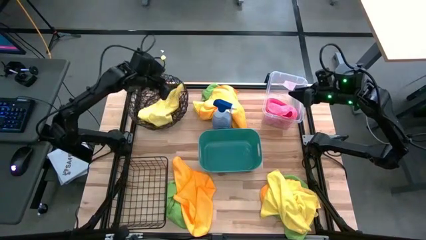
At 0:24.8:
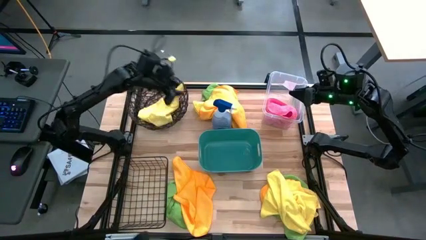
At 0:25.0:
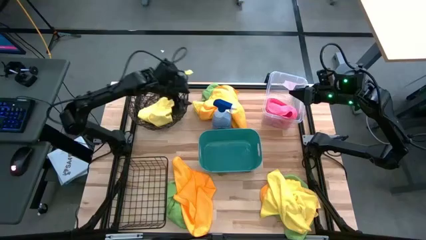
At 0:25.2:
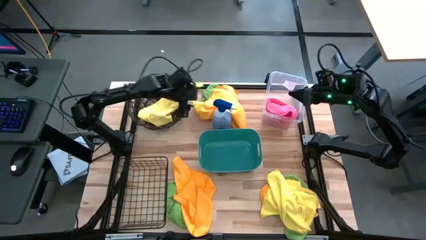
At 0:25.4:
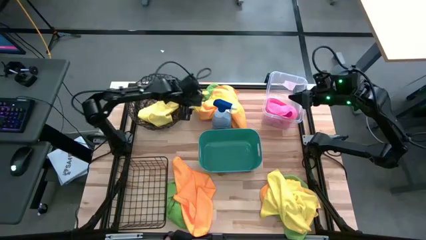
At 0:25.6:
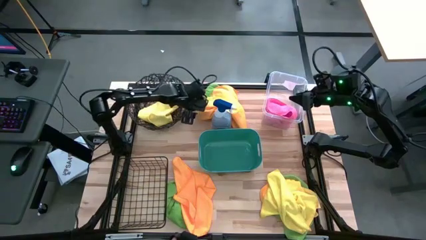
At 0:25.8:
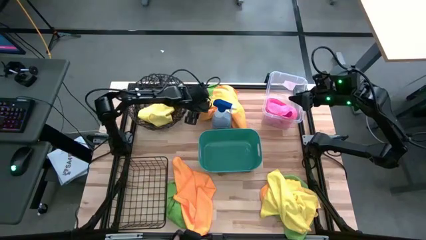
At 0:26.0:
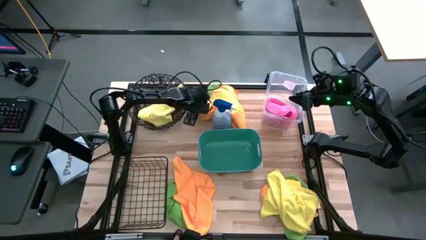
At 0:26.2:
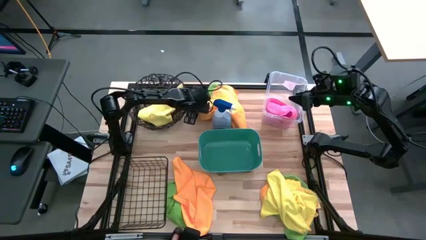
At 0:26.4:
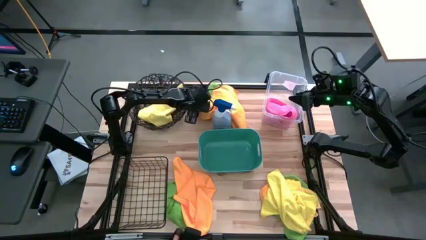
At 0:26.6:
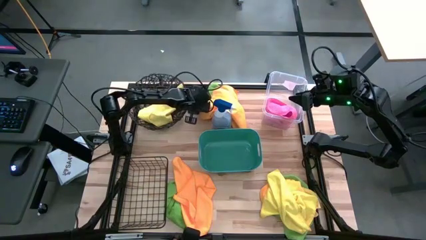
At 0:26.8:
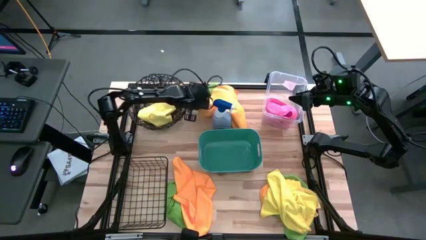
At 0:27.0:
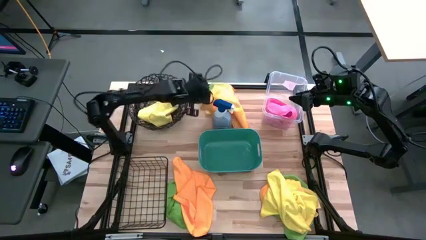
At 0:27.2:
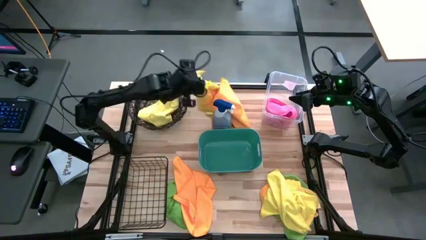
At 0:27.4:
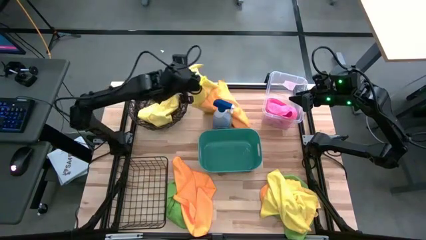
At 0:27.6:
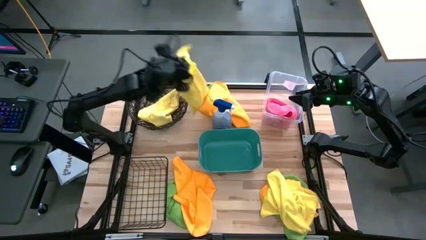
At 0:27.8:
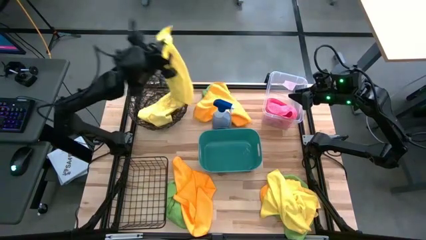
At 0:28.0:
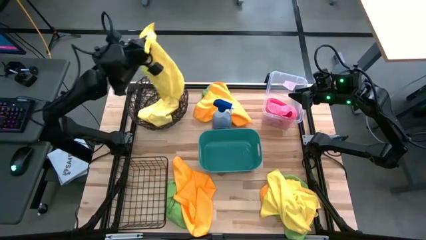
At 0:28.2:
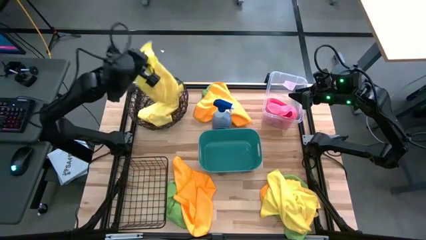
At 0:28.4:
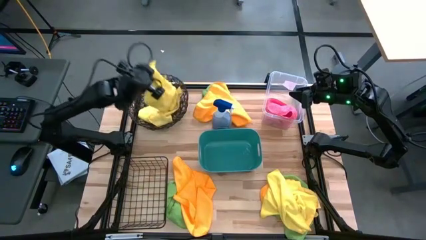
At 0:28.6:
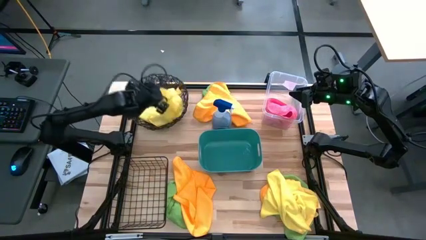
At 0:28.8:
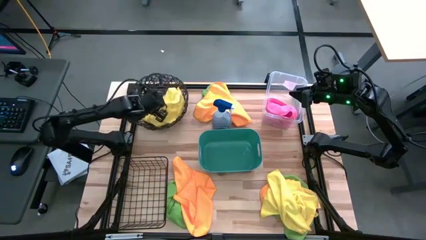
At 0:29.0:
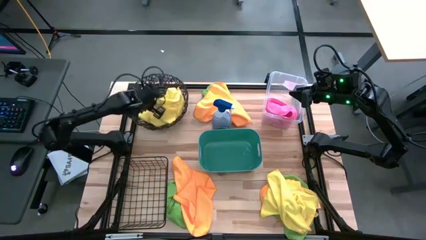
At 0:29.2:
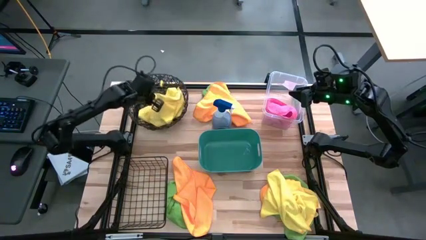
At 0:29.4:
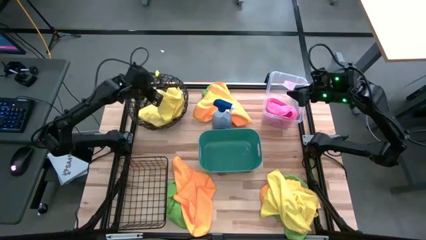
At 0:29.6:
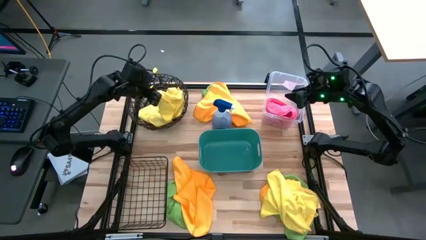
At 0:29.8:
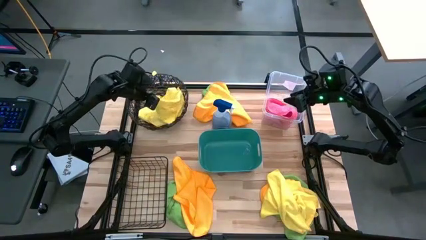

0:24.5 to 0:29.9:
Task: Sort microfiber towel by color & place in baskets
Put the top yellow towel into the round brown basket

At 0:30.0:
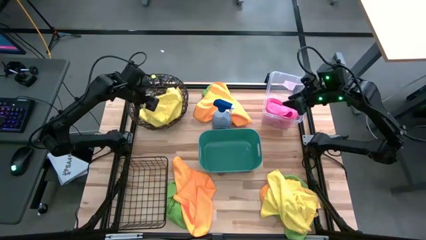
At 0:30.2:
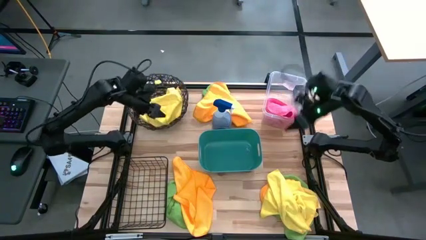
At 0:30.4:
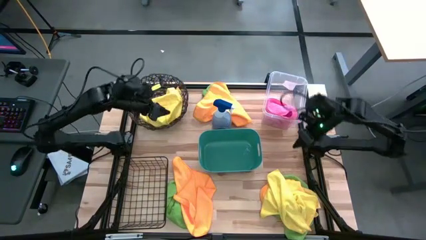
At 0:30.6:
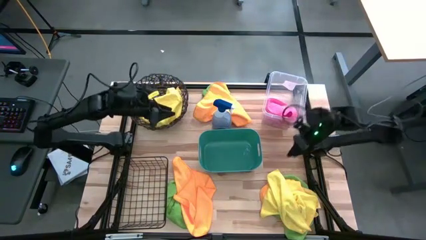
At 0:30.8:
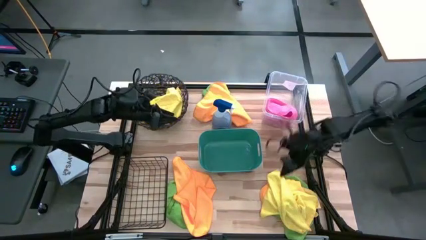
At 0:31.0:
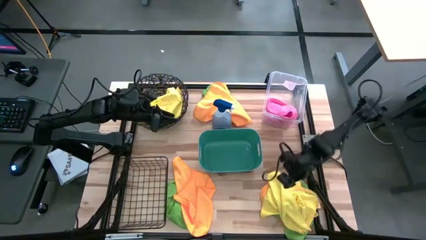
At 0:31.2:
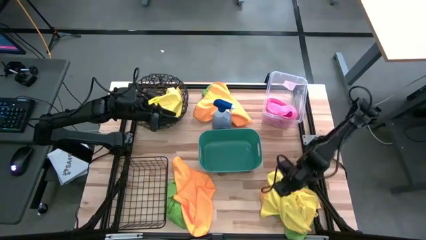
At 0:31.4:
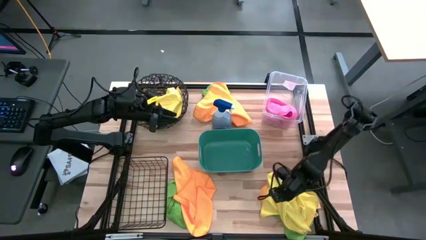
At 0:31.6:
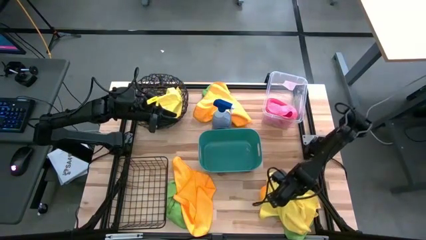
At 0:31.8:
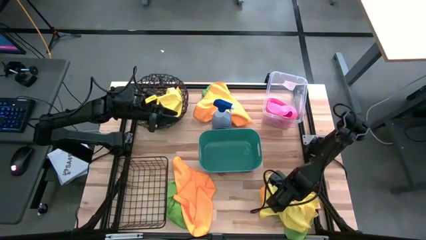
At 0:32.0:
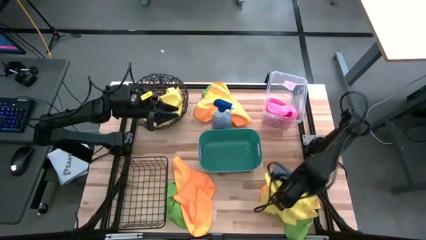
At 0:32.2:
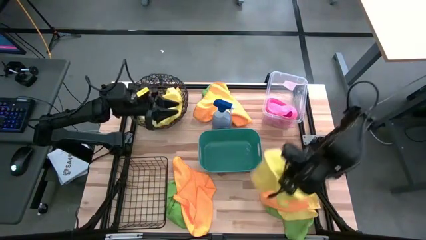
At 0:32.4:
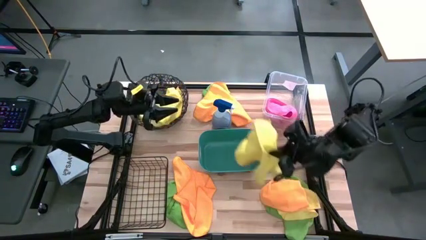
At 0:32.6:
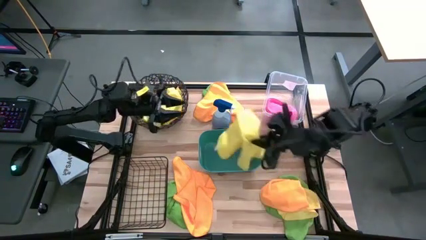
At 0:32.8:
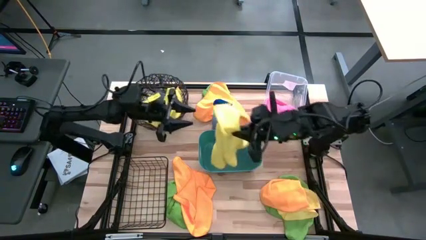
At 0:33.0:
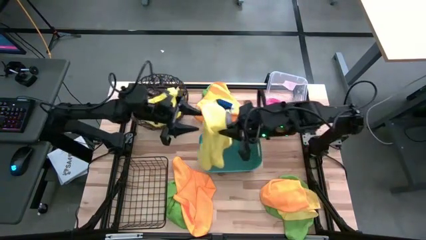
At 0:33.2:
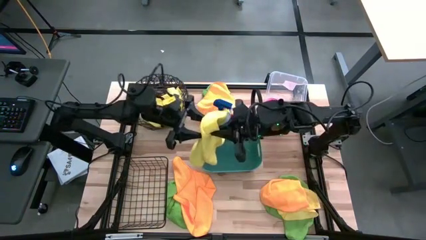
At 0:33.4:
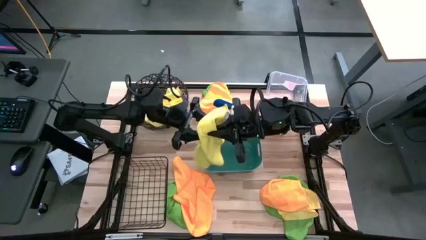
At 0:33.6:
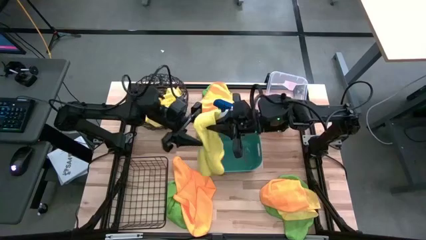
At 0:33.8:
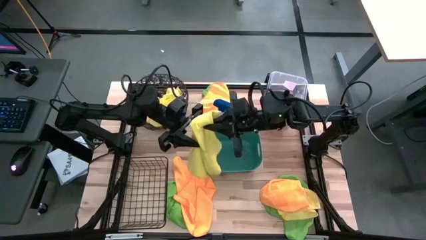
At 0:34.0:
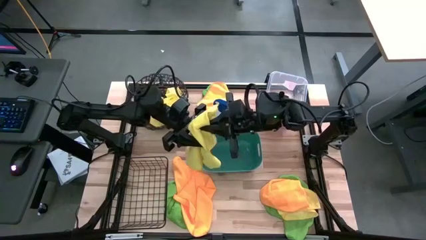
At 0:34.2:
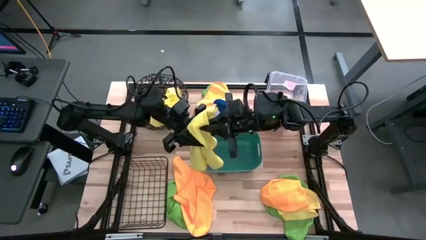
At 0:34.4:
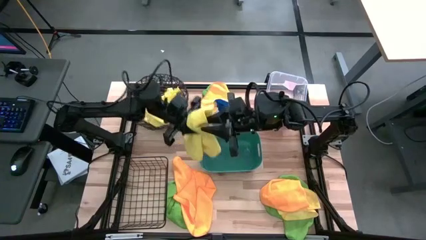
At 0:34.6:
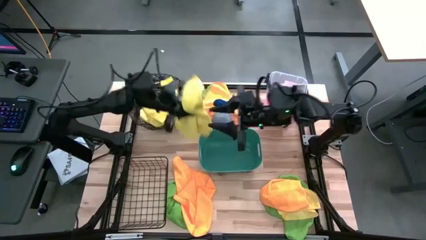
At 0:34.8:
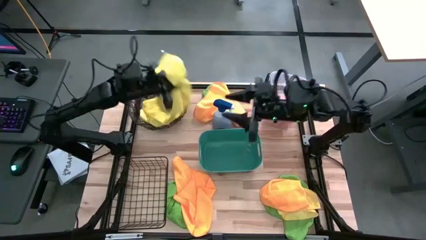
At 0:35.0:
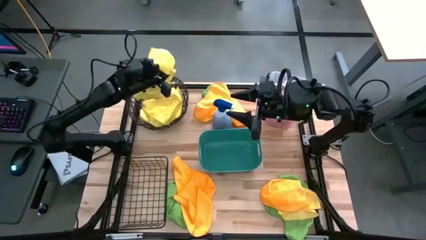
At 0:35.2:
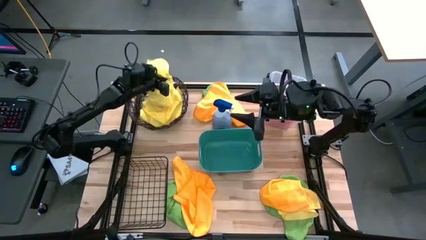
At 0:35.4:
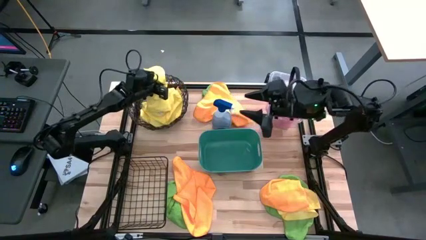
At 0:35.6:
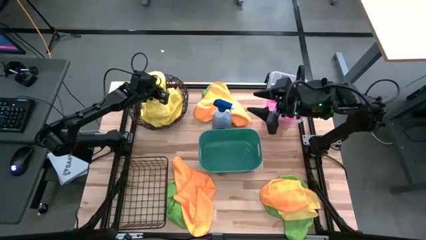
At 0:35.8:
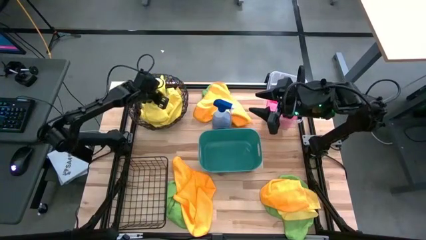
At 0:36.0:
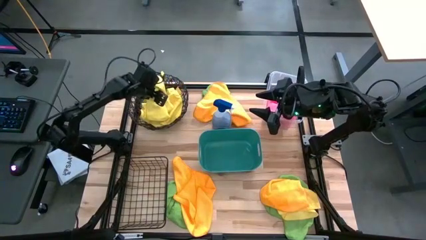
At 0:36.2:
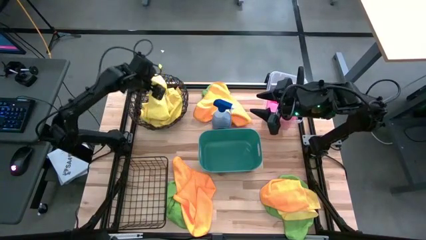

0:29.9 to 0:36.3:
Put the yellow towel into the round brown basket

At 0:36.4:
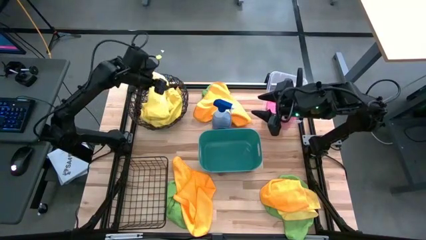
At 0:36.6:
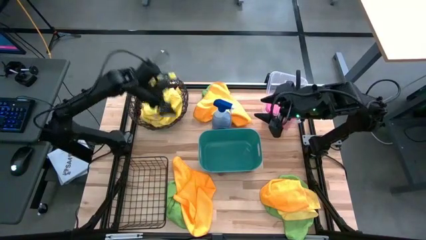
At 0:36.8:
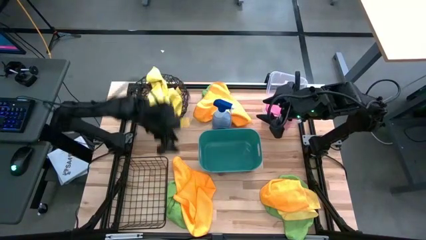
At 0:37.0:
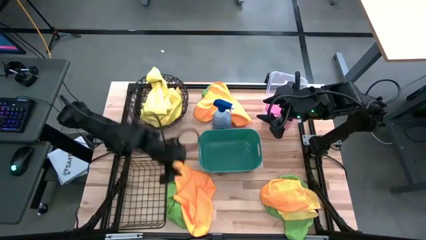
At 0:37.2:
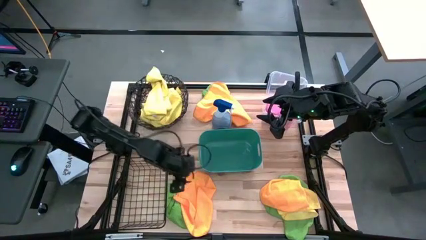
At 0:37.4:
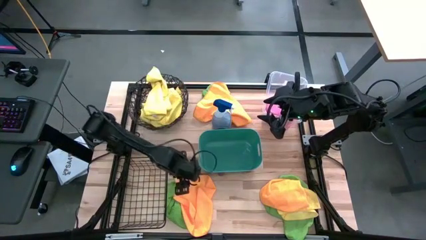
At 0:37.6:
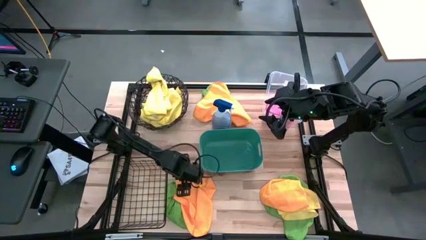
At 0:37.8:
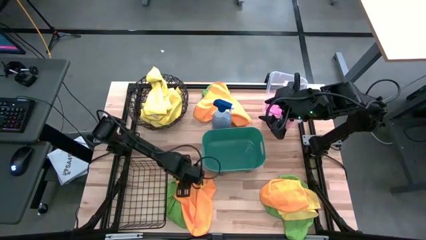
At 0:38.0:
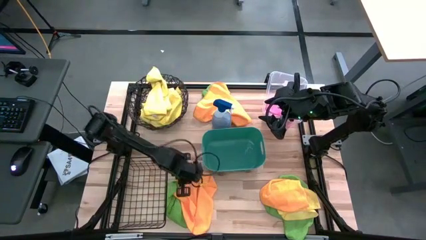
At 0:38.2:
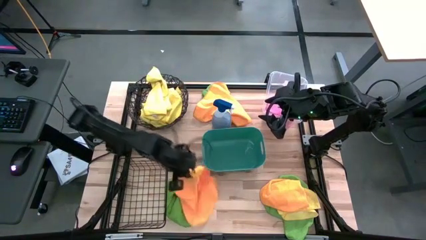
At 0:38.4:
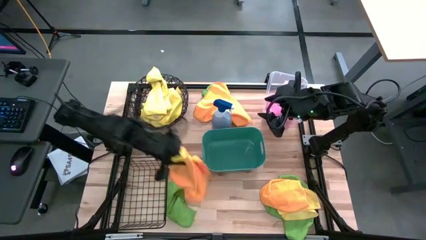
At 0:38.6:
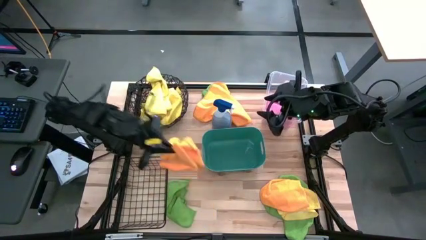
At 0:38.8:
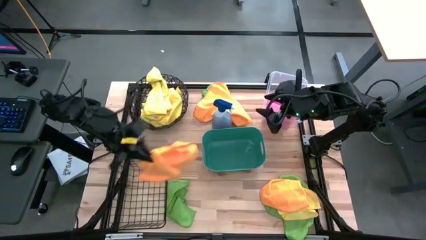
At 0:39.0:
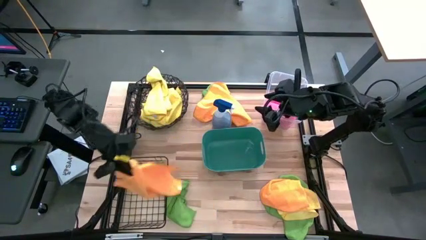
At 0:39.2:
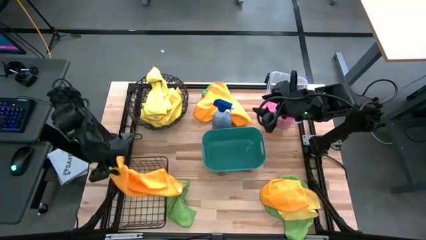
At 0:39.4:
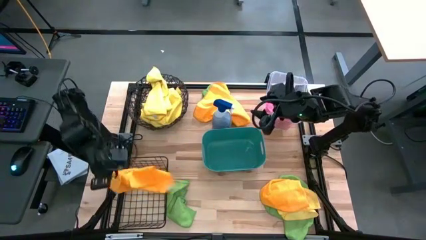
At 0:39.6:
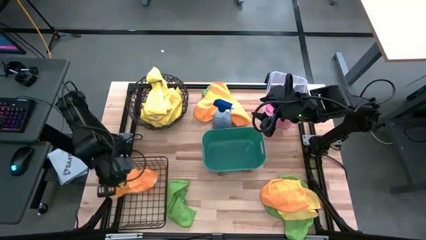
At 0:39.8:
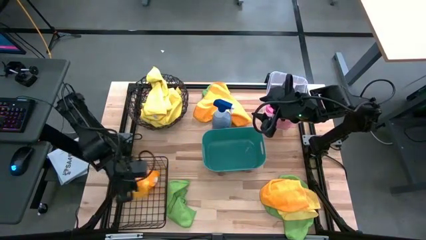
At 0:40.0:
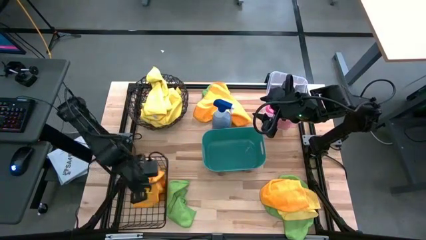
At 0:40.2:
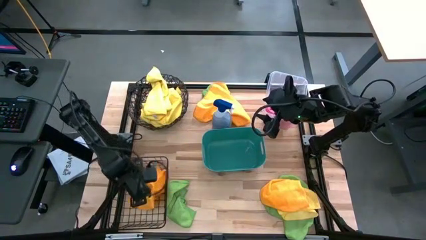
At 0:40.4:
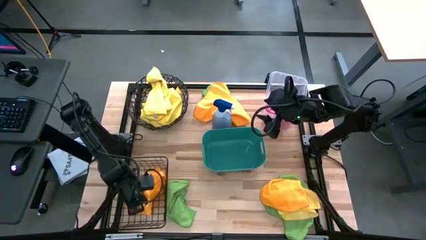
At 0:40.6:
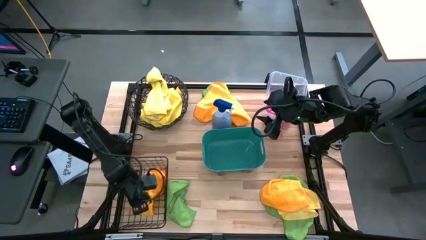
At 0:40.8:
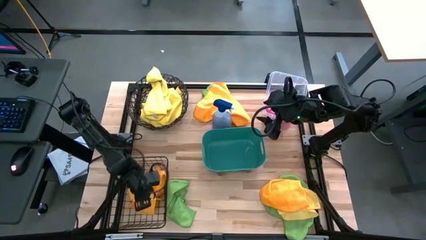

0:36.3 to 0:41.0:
Put the bottom left orange towel into the black wire basket
